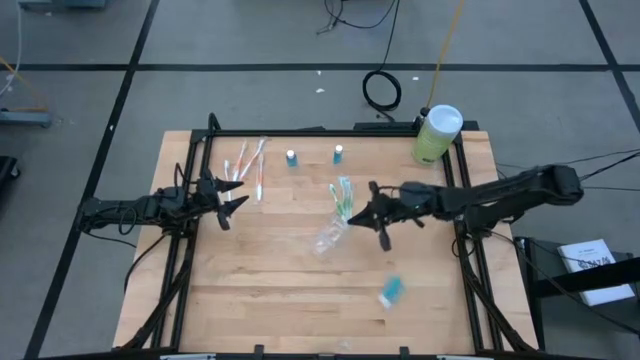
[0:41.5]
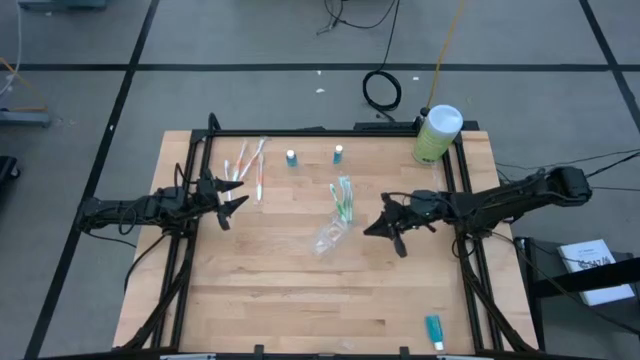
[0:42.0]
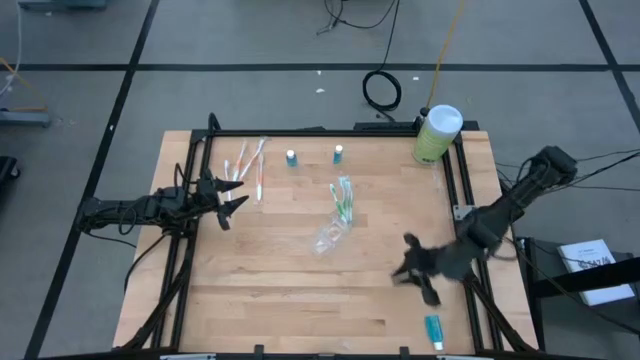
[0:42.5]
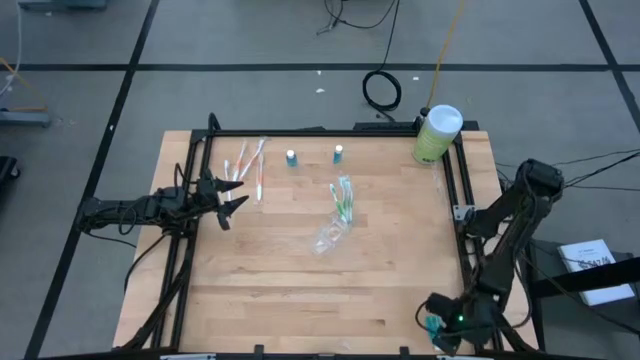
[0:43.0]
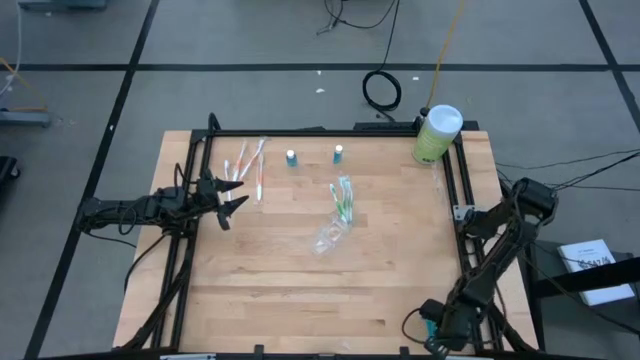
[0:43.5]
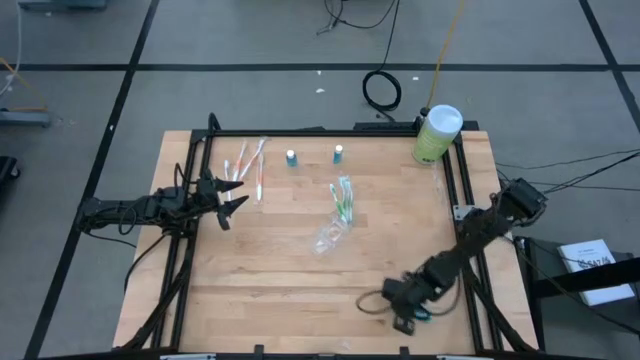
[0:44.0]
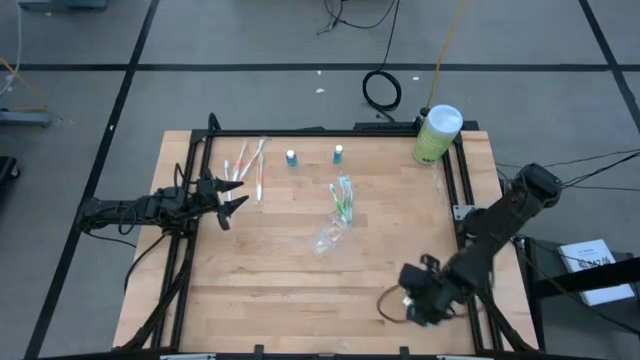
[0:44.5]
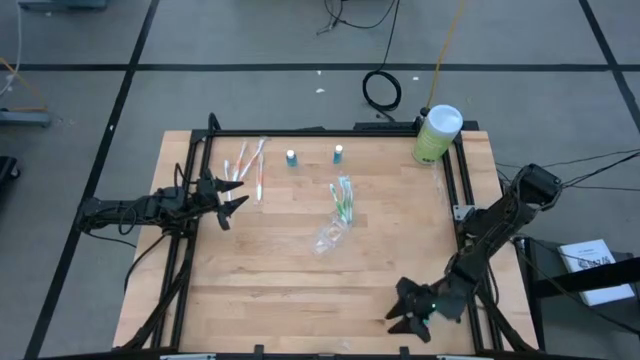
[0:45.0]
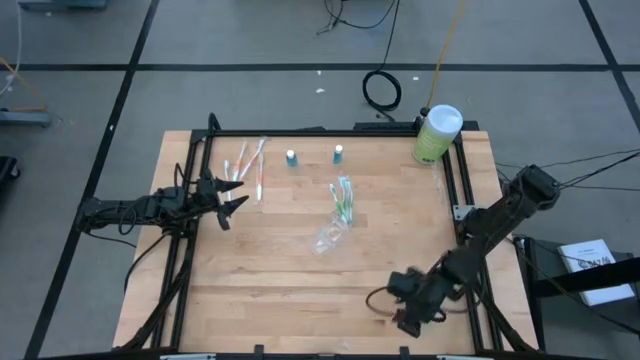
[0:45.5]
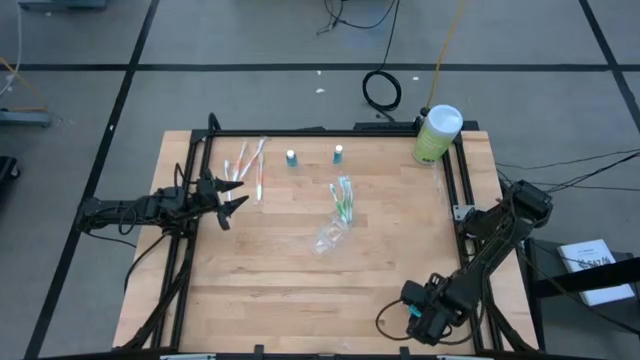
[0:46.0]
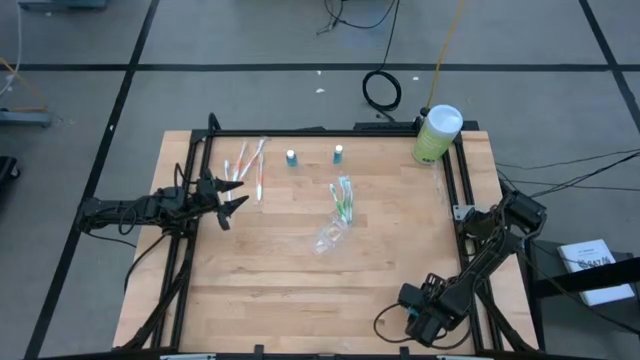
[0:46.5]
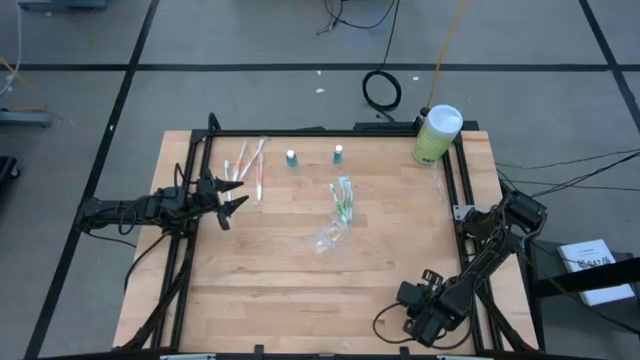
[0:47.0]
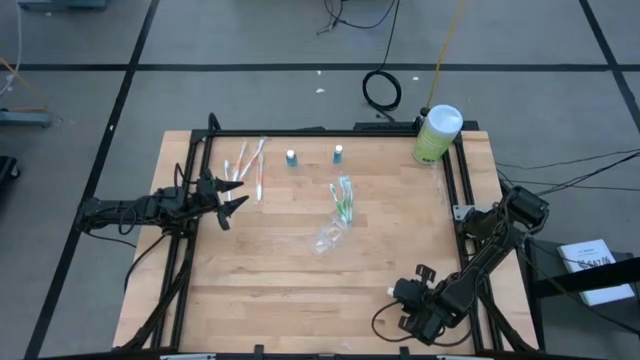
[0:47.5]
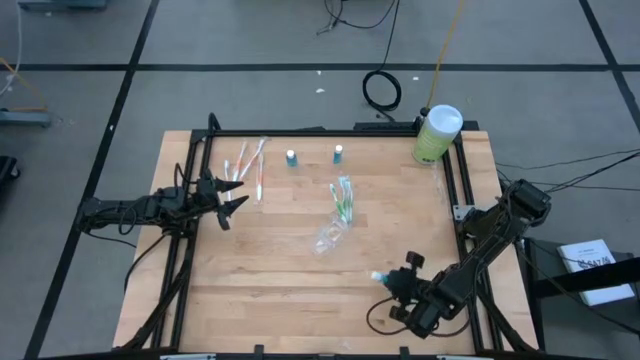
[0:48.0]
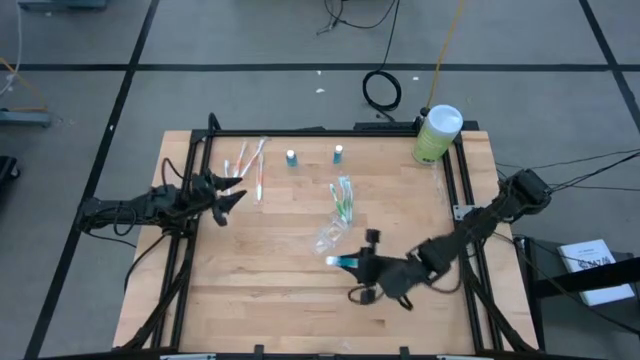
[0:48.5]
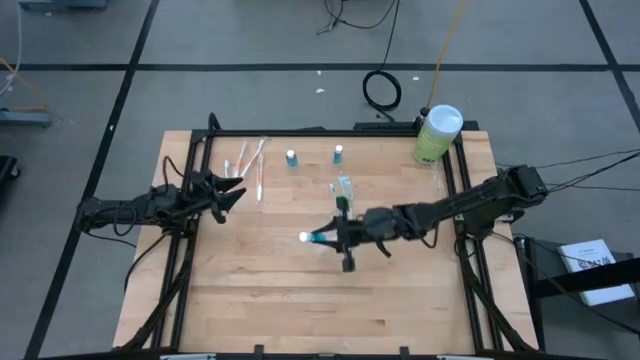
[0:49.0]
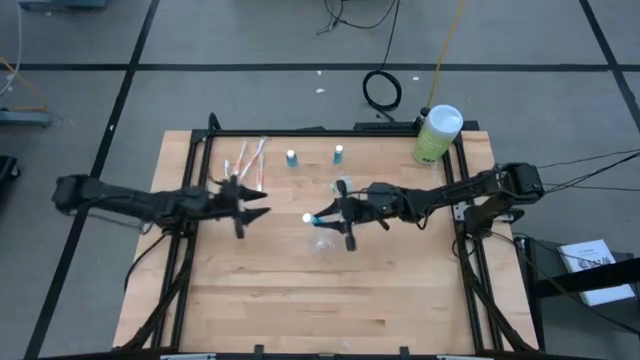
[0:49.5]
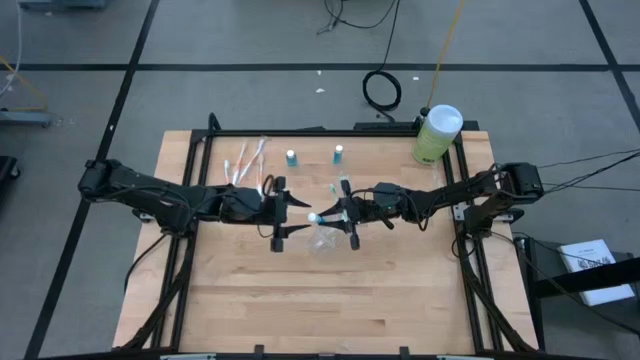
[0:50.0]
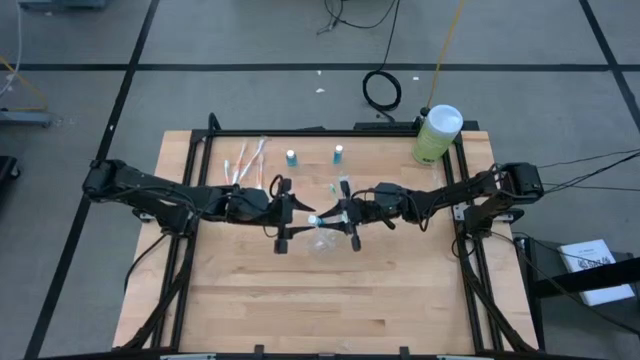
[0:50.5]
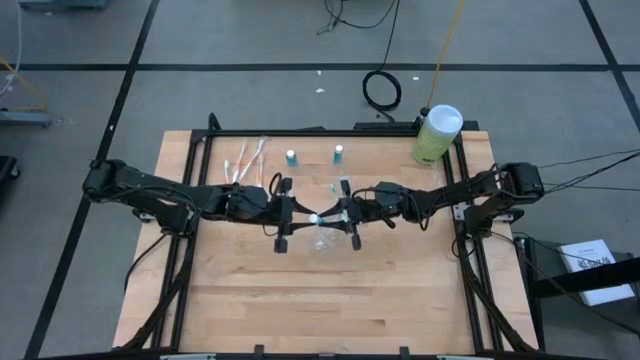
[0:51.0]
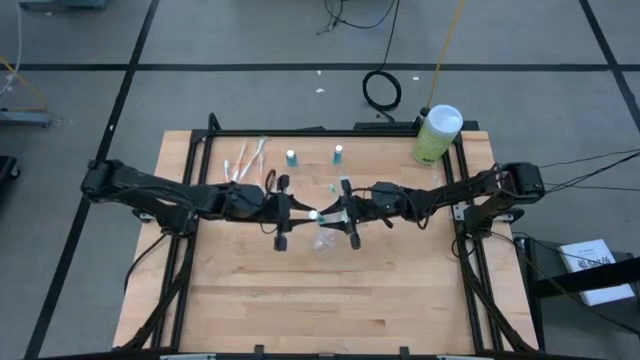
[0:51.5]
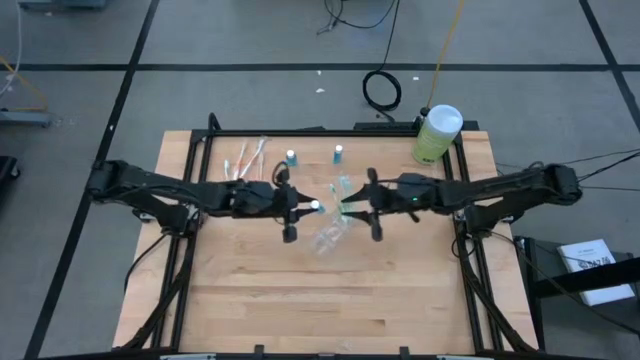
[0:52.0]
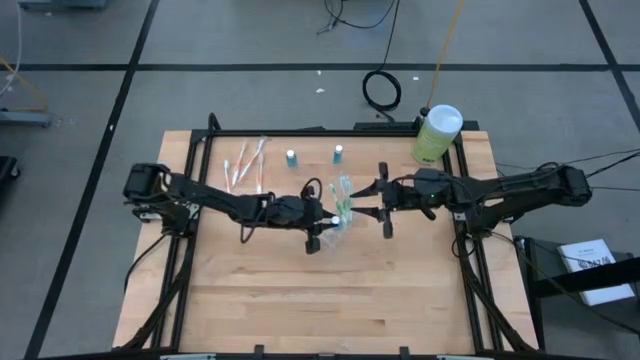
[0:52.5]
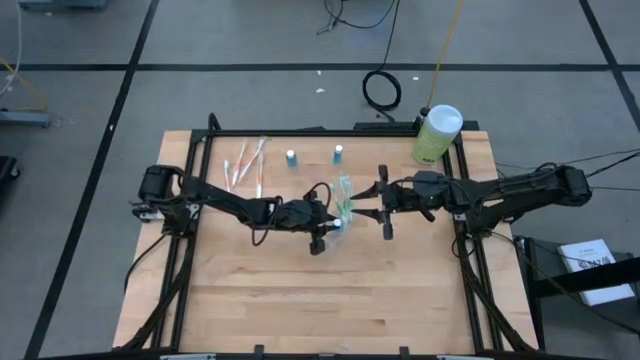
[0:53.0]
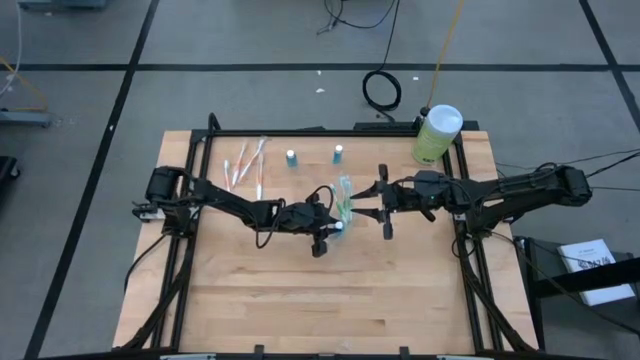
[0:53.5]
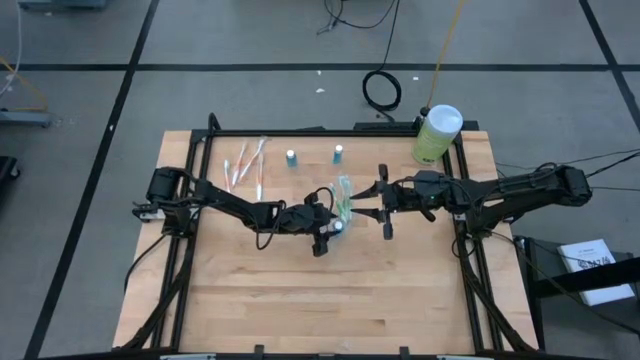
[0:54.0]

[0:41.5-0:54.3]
Task: Pick & Place toothbrushing station
Put the mouthwash bottle into the transparent organizer

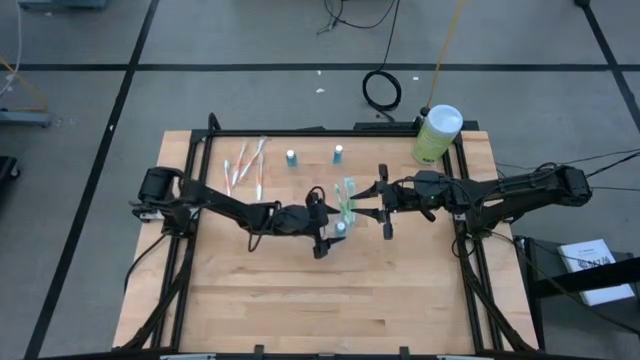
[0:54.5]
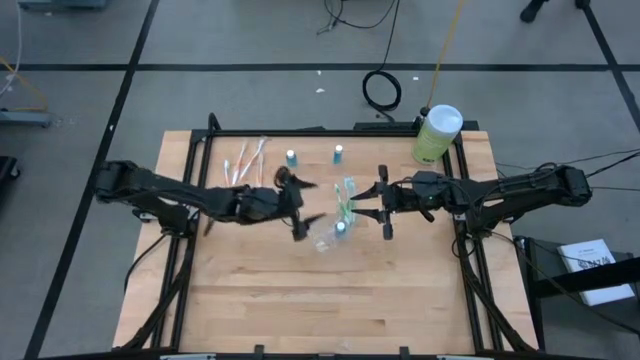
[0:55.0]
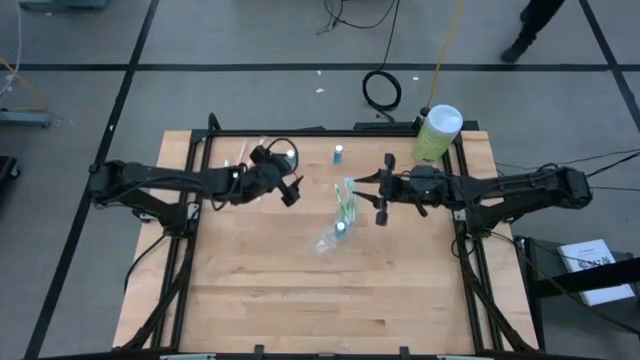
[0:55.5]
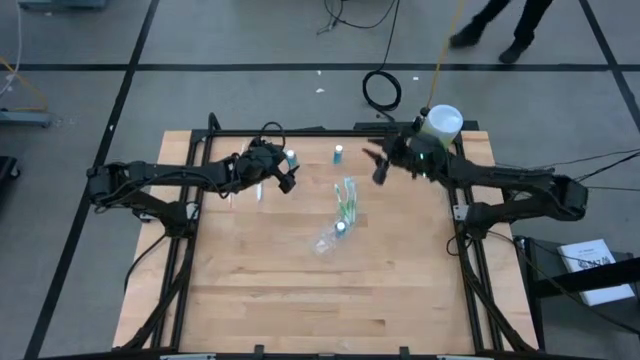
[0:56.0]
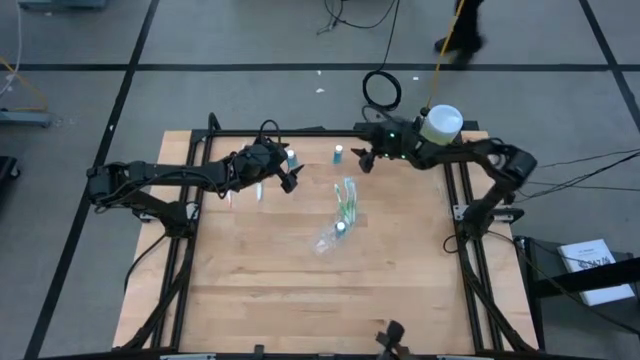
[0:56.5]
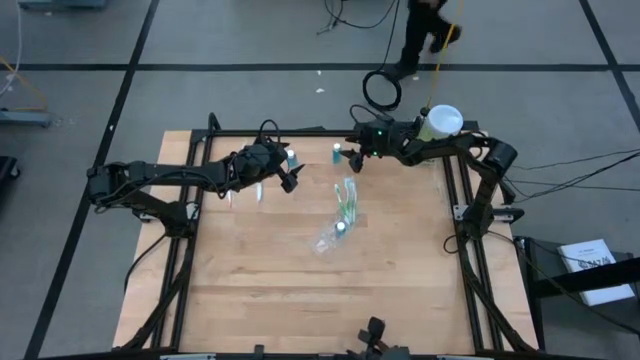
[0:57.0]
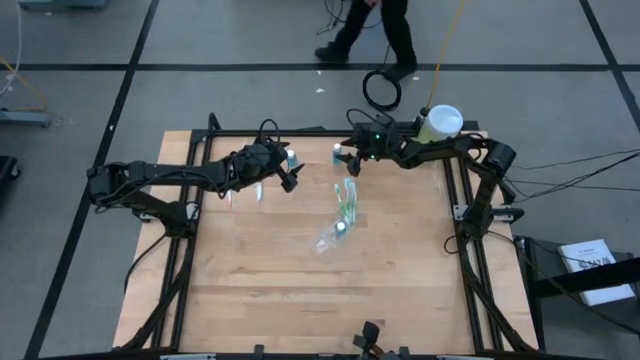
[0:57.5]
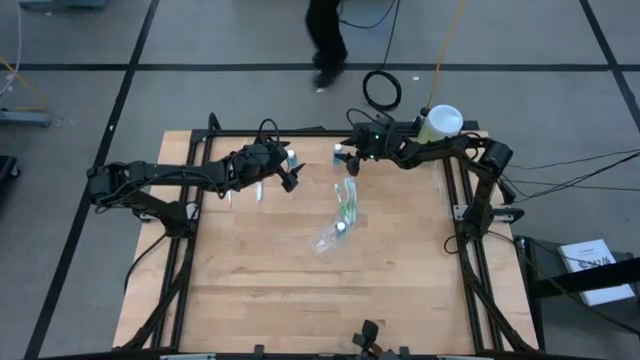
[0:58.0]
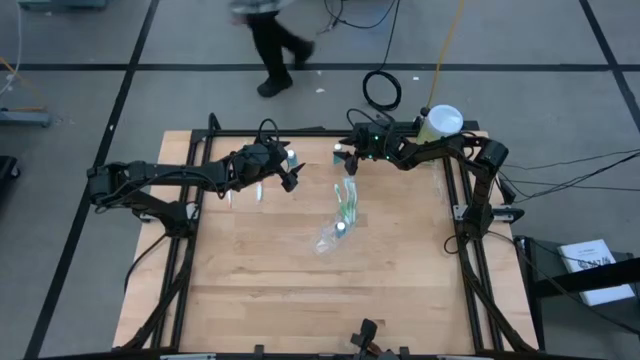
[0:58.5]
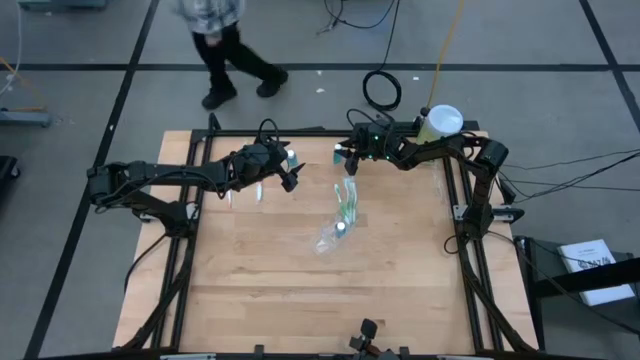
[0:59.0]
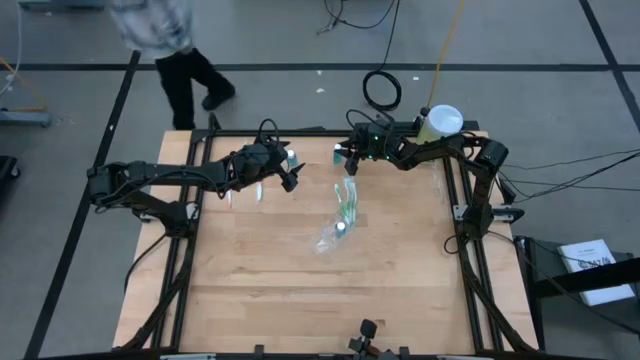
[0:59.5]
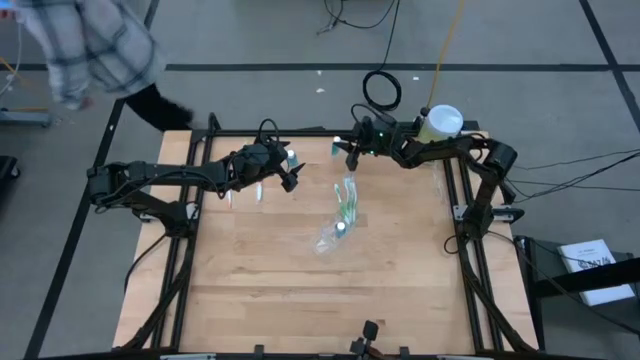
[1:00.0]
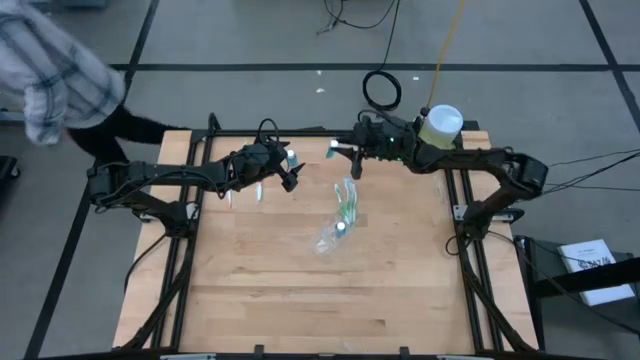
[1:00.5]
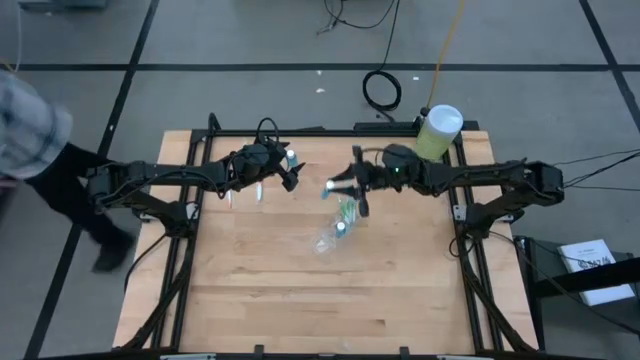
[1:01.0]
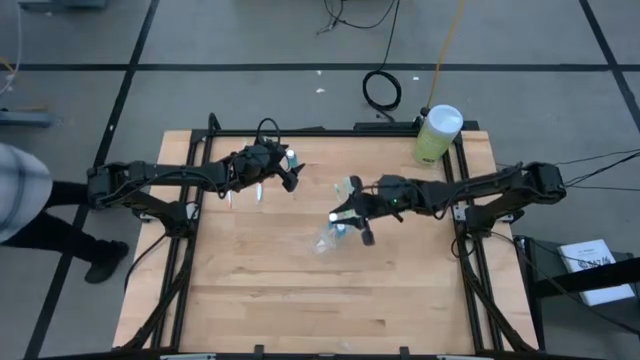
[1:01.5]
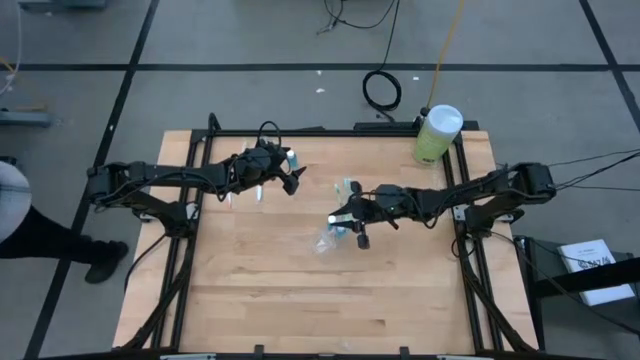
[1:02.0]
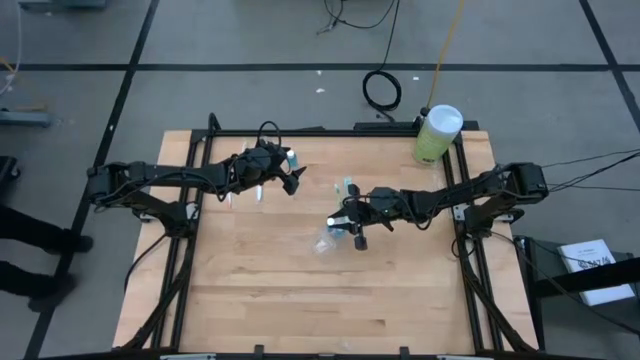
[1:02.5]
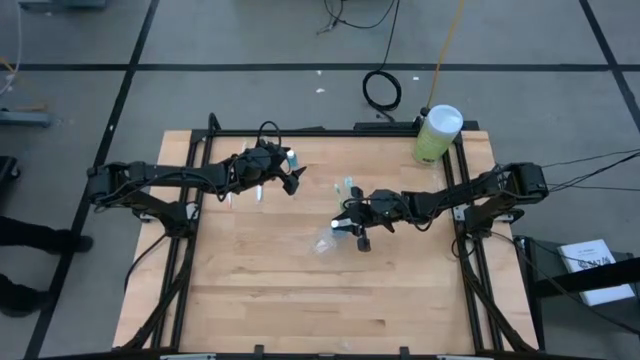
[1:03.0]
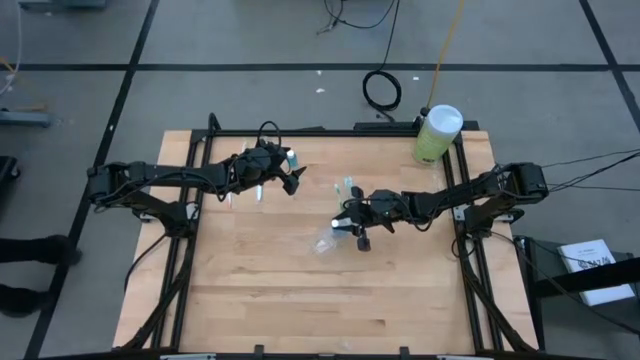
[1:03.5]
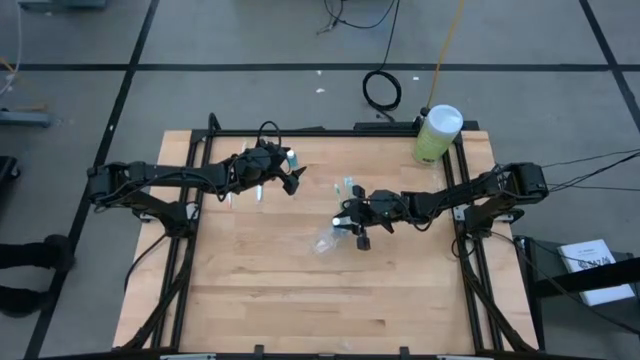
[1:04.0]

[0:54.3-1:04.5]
Put the mouthwash bottle into the transparent organizer
